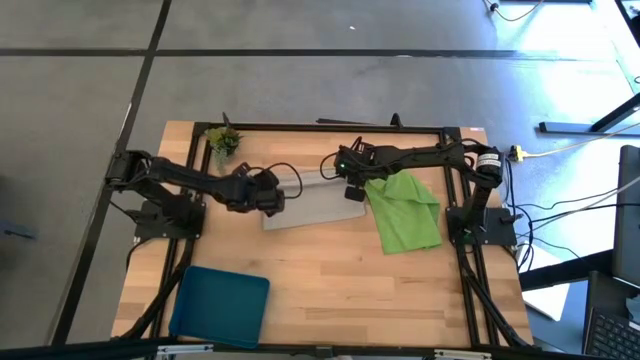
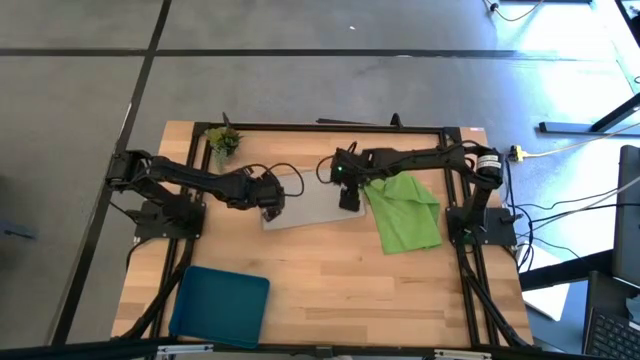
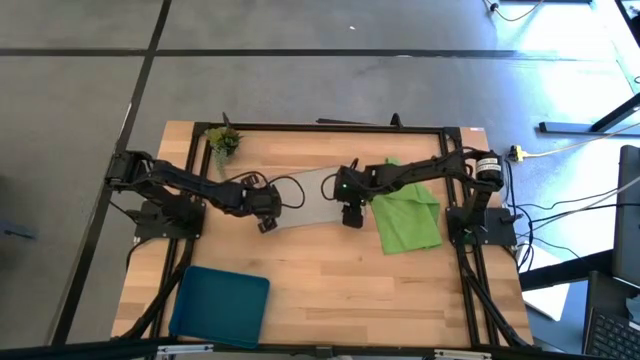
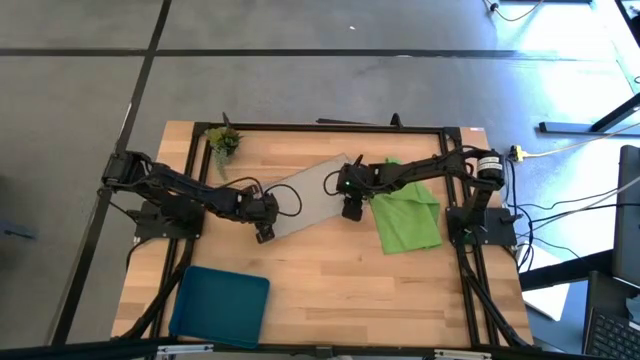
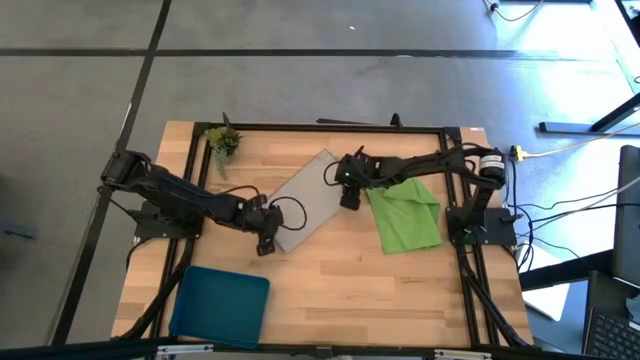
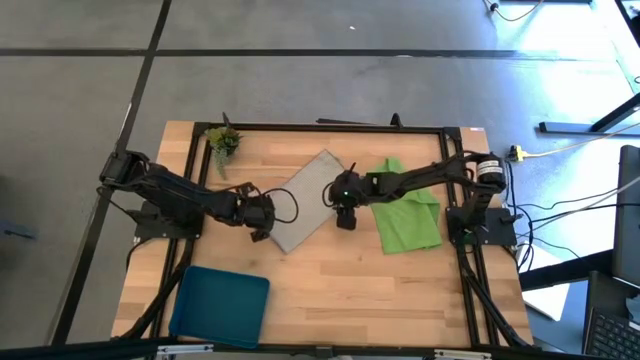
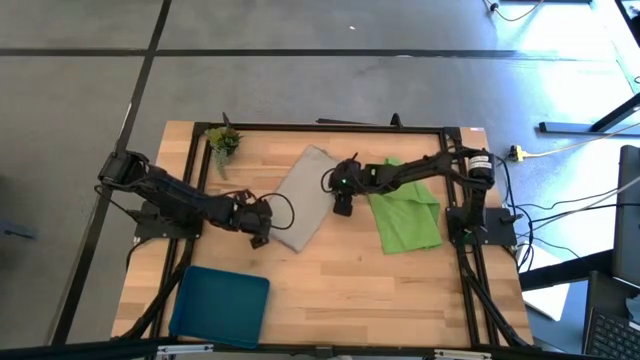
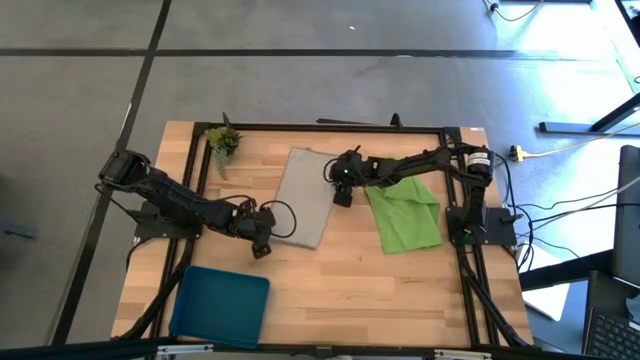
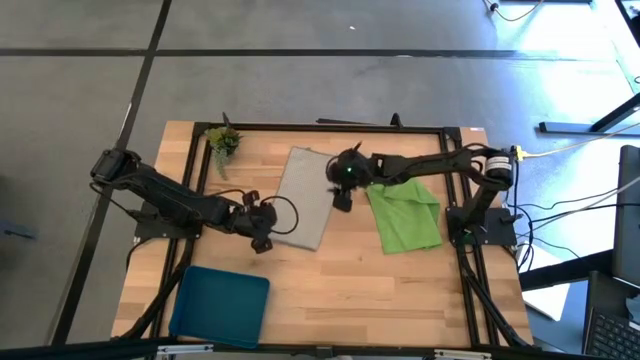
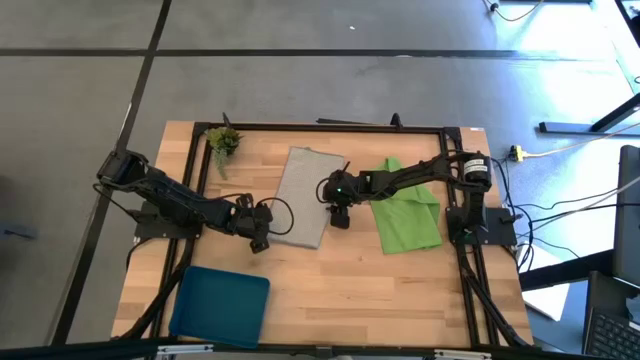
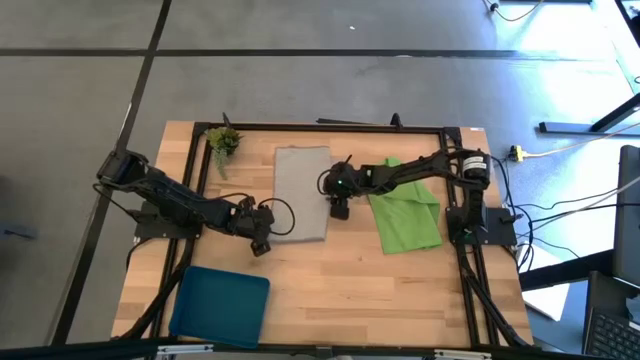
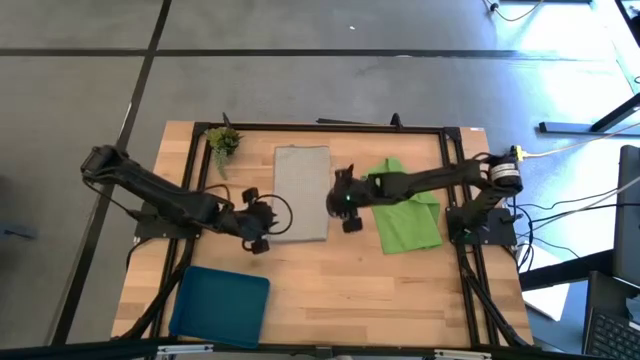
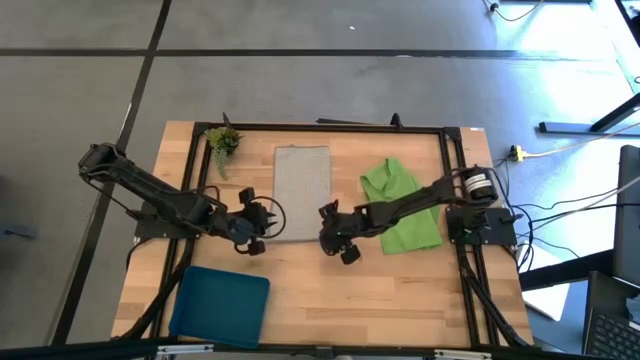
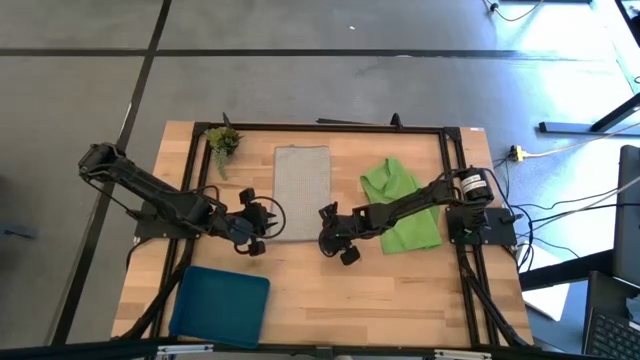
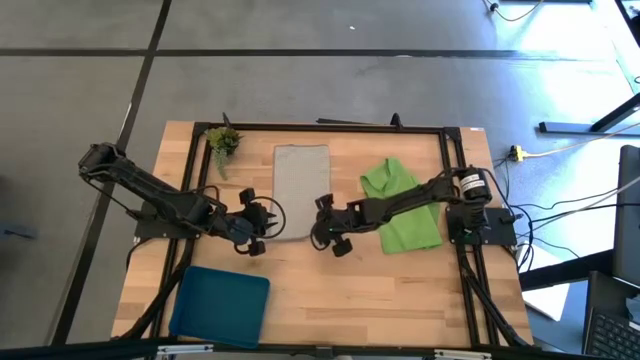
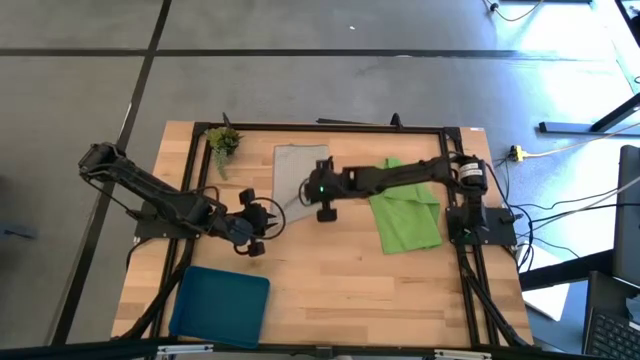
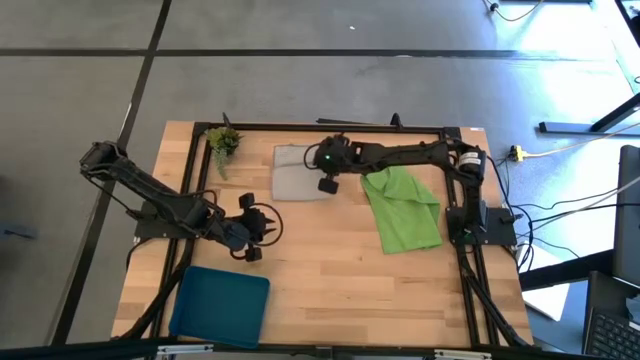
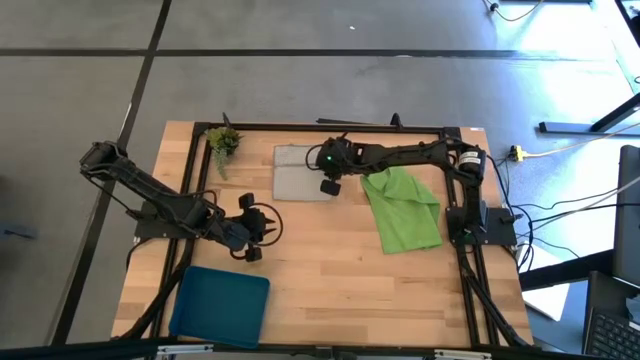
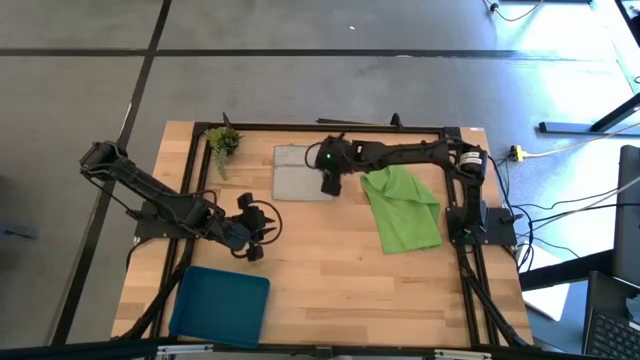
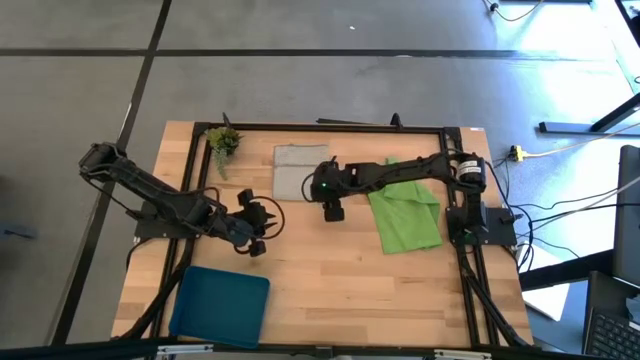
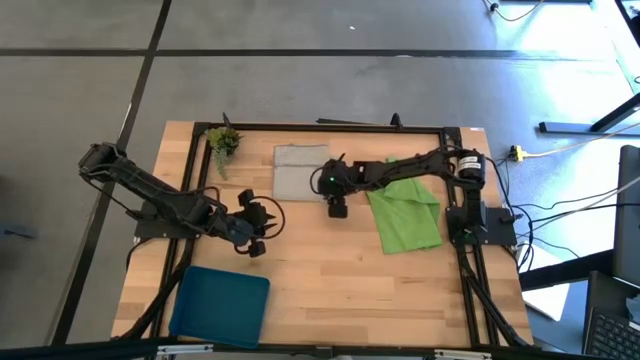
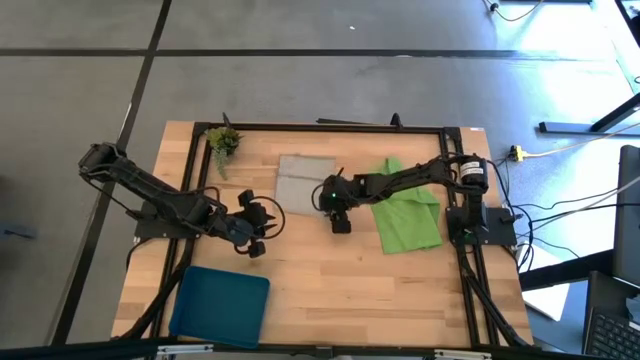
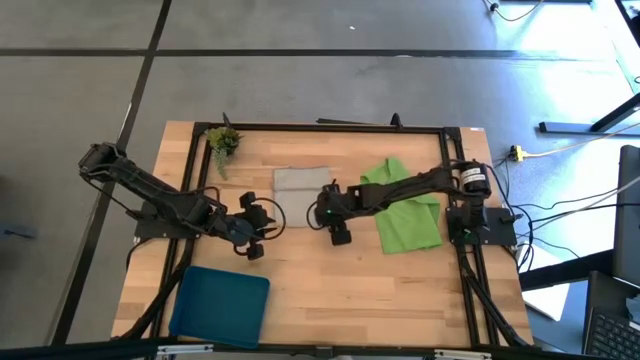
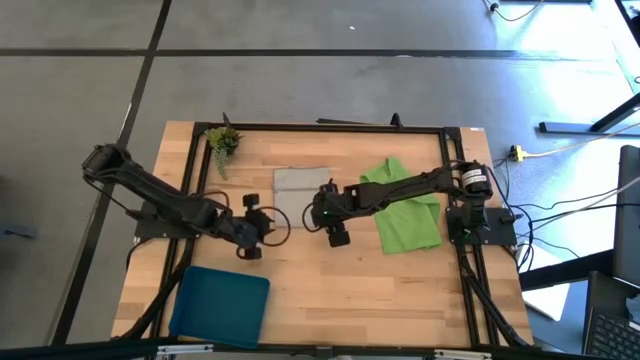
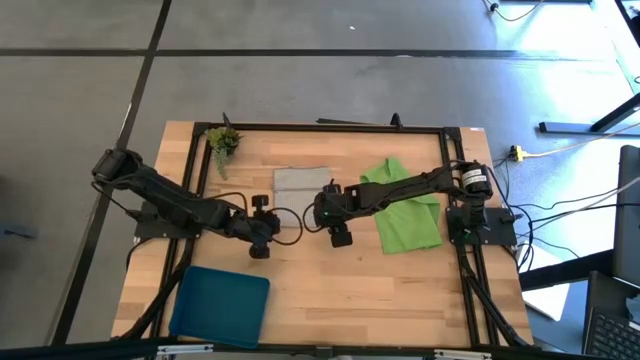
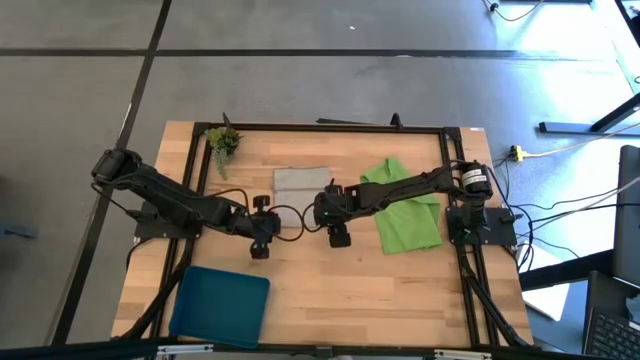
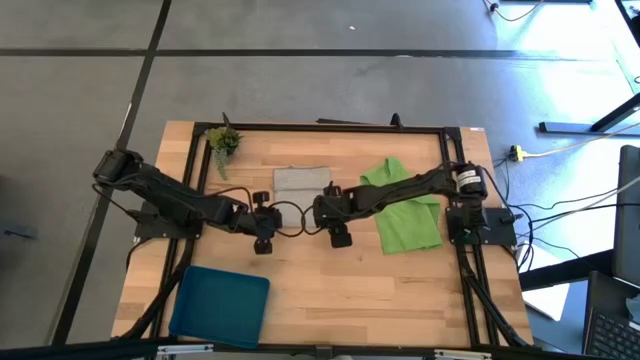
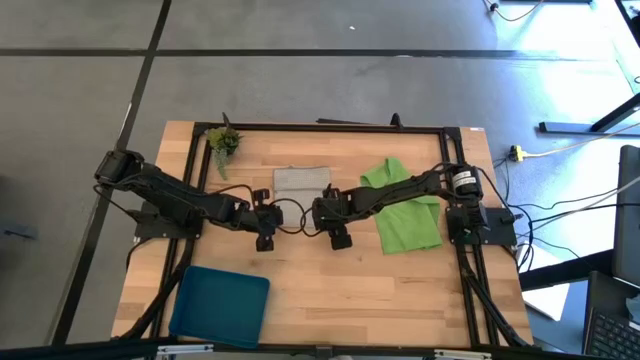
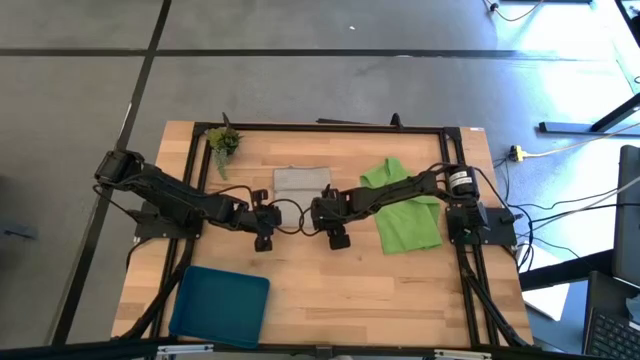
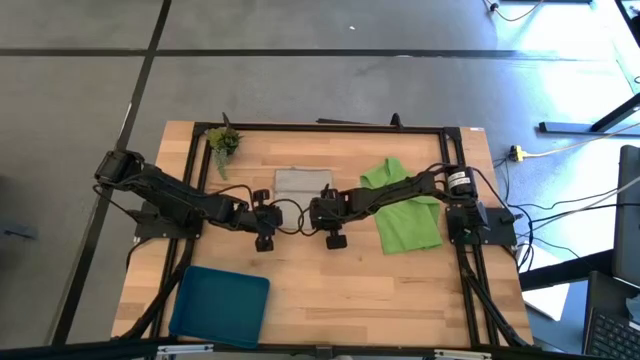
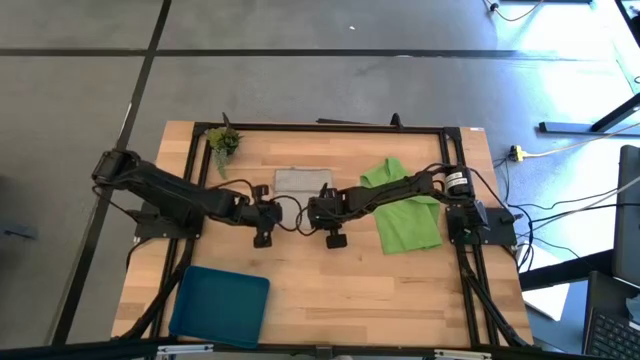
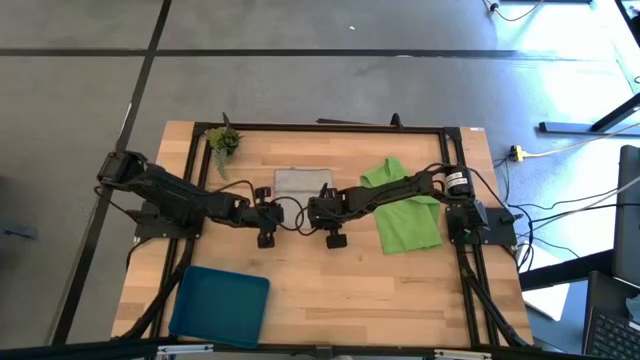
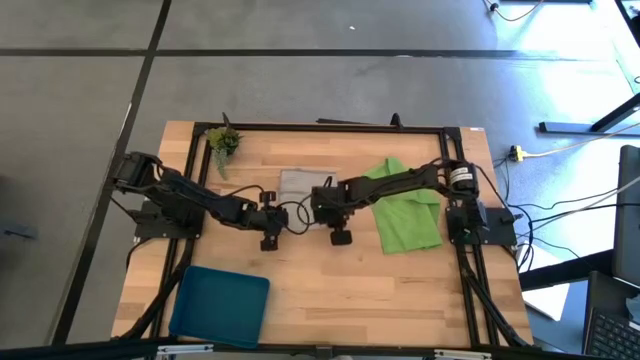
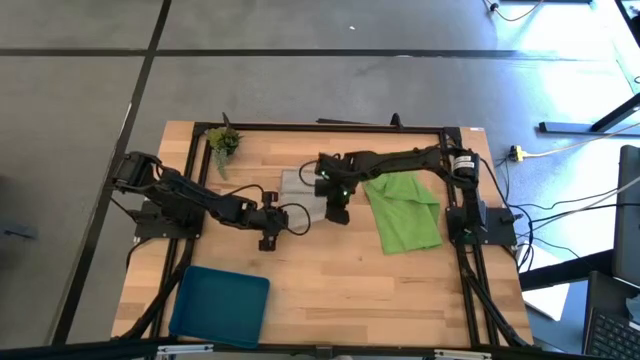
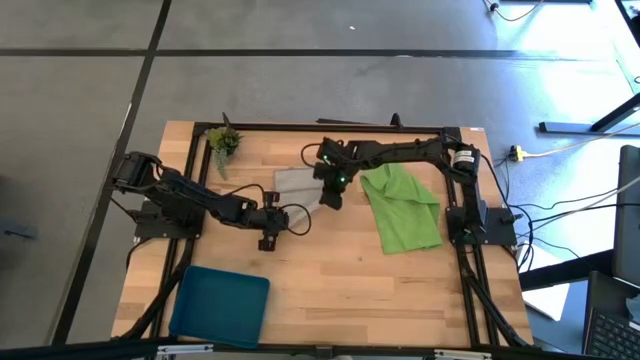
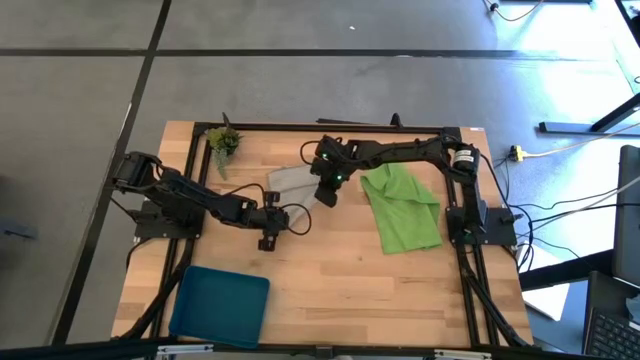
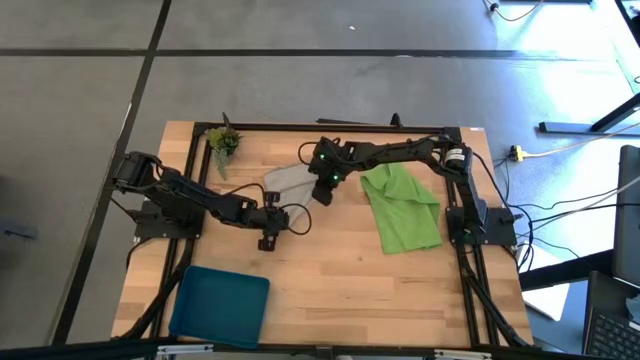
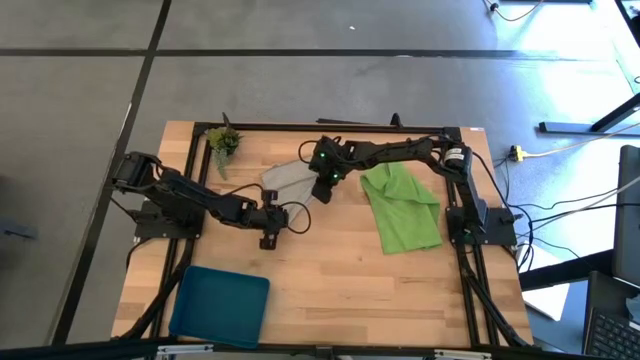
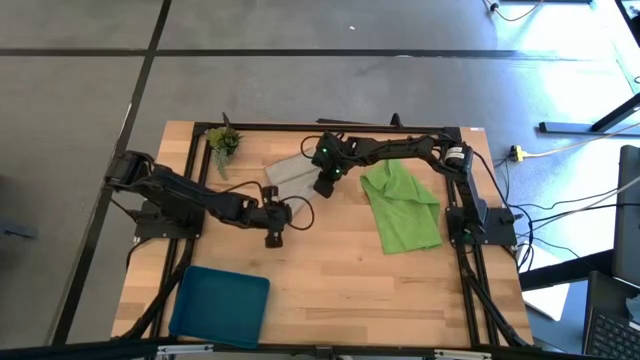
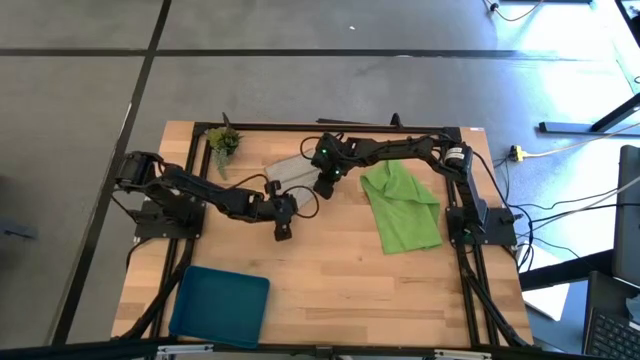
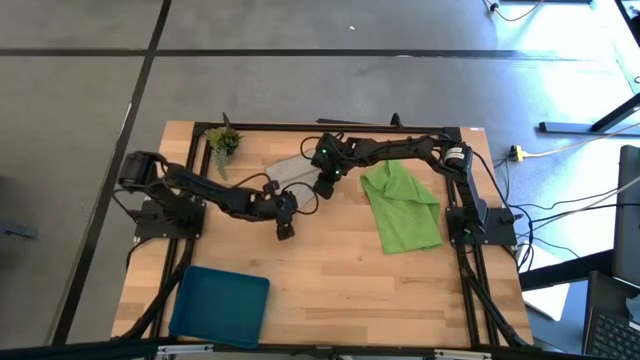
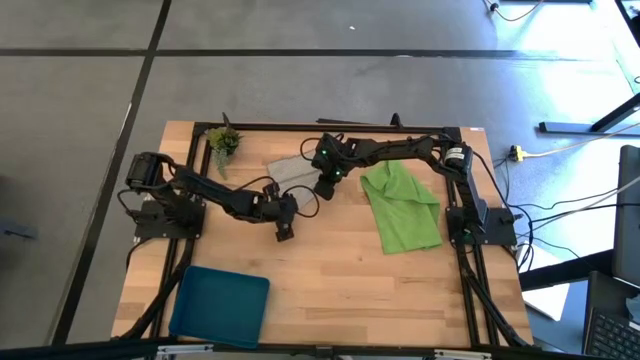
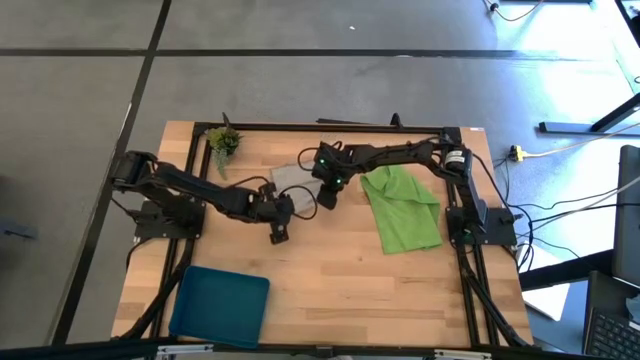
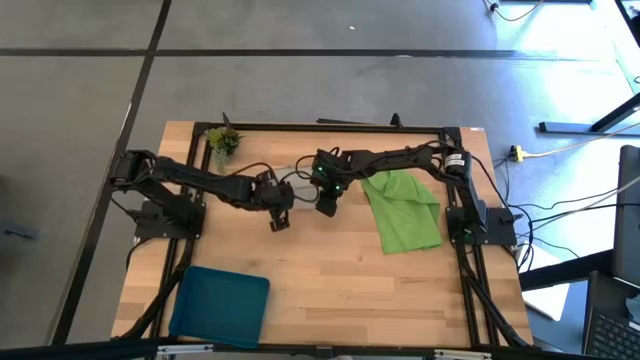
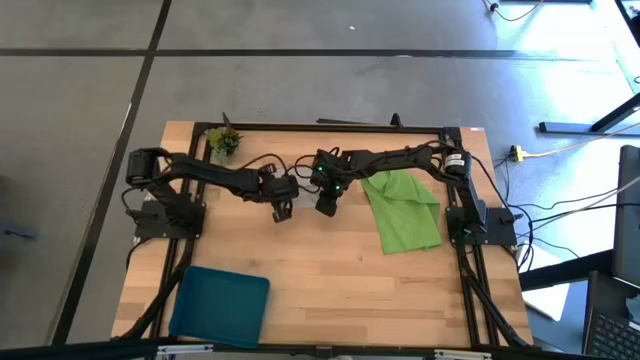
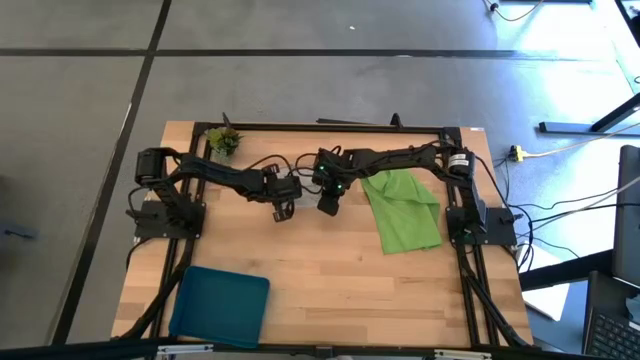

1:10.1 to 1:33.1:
Task: Fold microfiber towels
Fold the gray microfiber cloth
